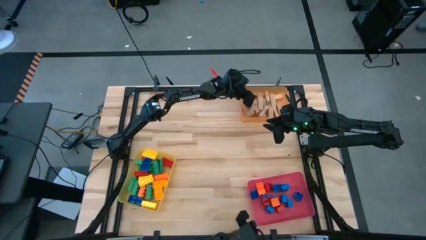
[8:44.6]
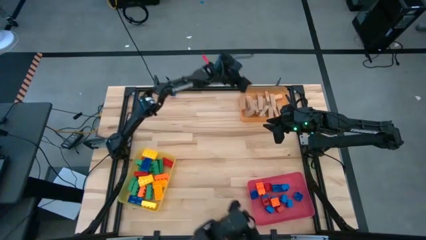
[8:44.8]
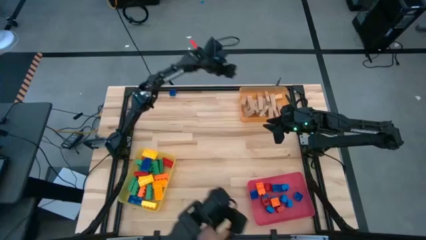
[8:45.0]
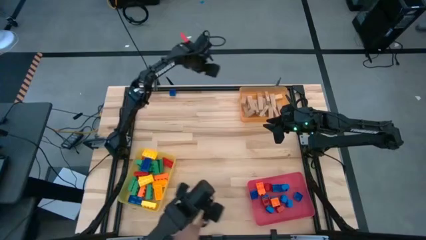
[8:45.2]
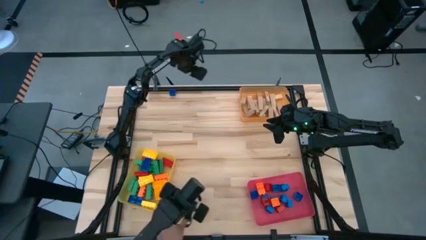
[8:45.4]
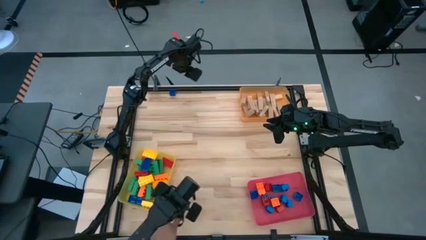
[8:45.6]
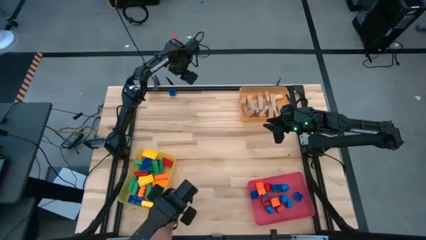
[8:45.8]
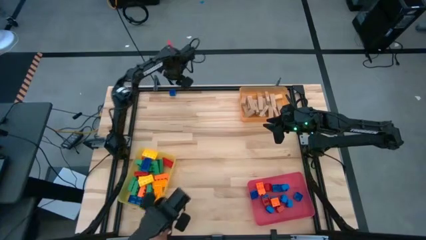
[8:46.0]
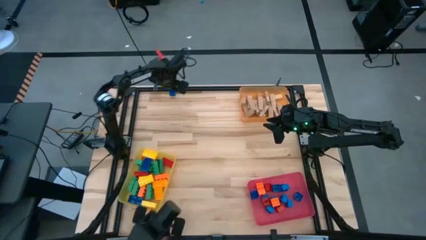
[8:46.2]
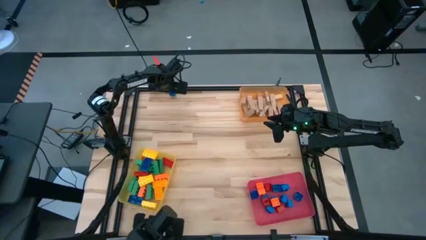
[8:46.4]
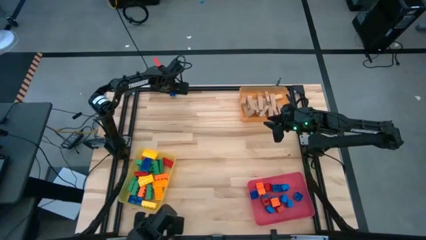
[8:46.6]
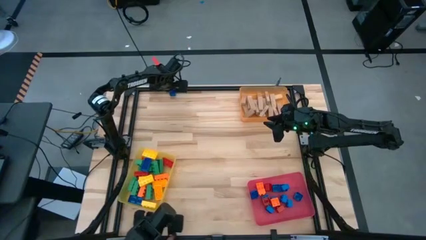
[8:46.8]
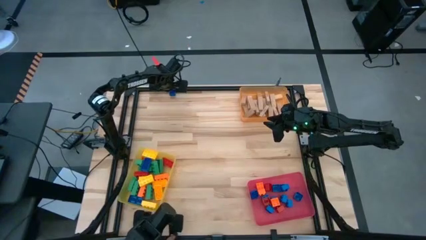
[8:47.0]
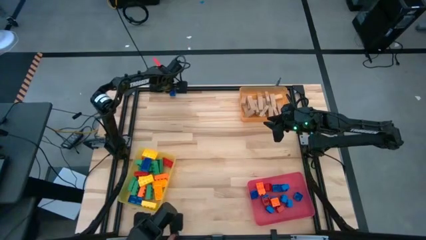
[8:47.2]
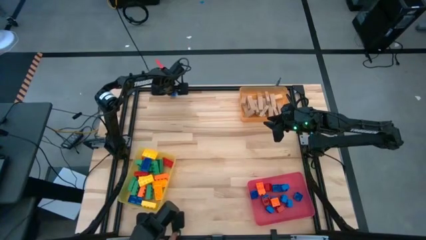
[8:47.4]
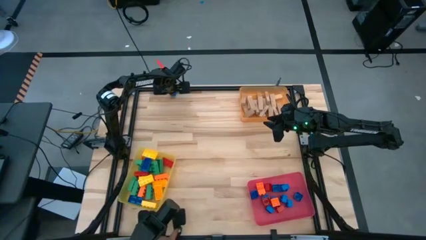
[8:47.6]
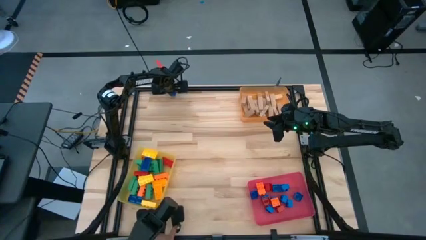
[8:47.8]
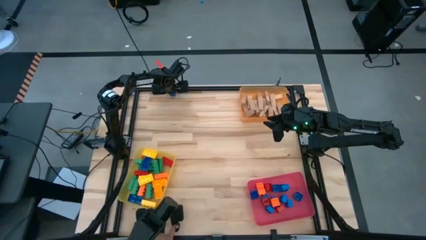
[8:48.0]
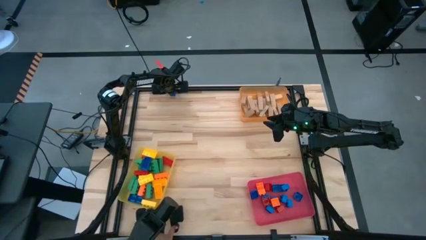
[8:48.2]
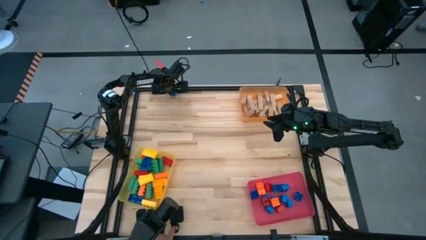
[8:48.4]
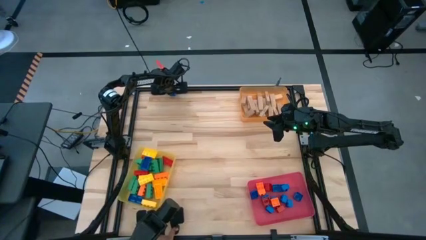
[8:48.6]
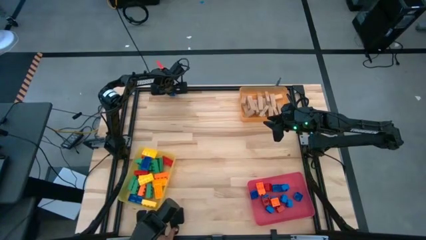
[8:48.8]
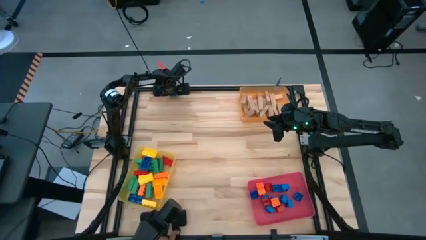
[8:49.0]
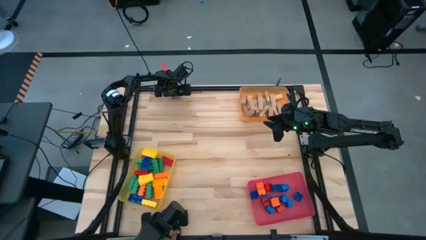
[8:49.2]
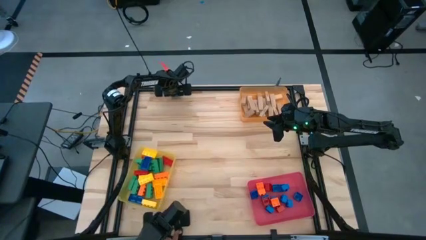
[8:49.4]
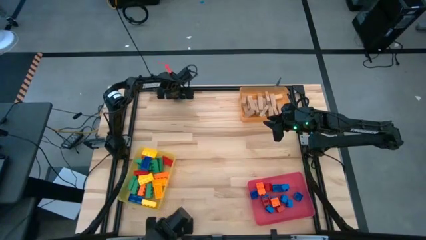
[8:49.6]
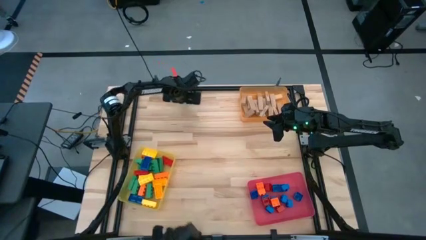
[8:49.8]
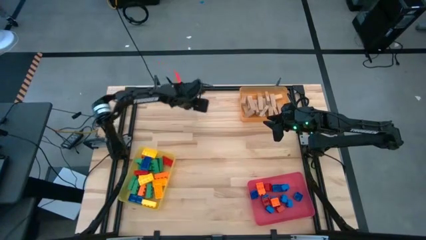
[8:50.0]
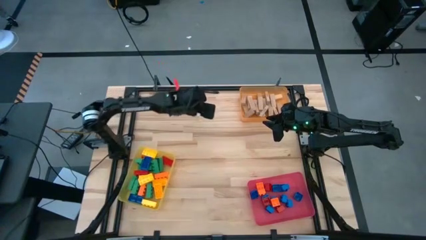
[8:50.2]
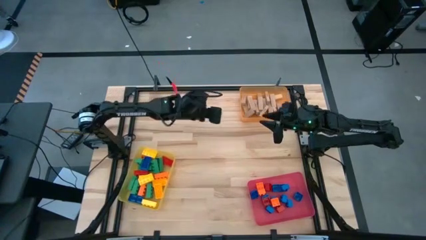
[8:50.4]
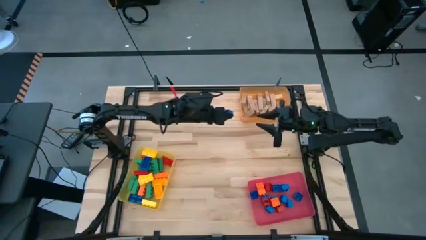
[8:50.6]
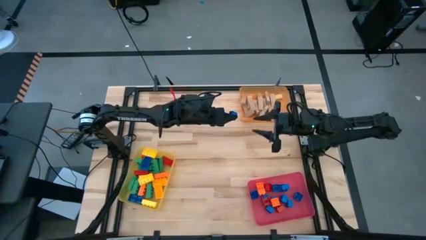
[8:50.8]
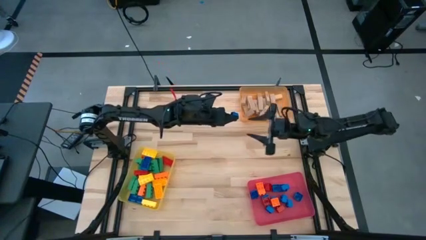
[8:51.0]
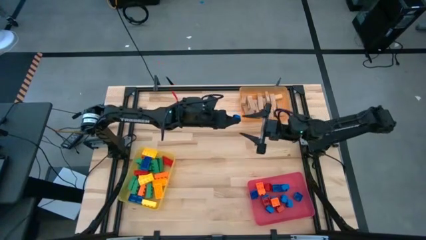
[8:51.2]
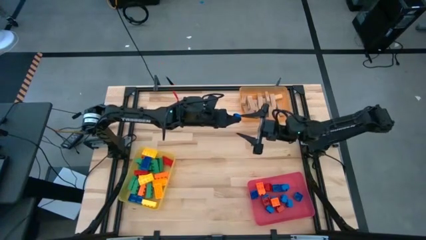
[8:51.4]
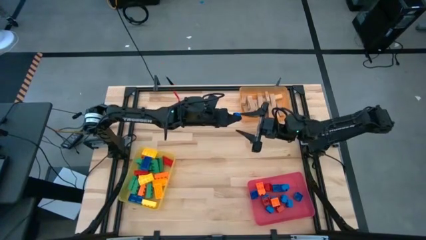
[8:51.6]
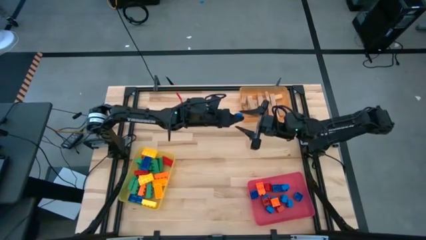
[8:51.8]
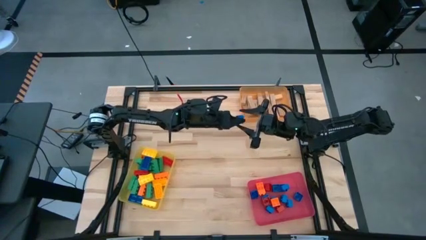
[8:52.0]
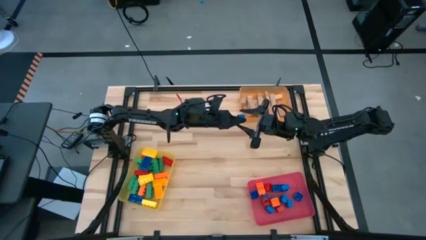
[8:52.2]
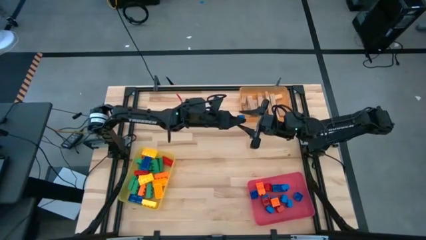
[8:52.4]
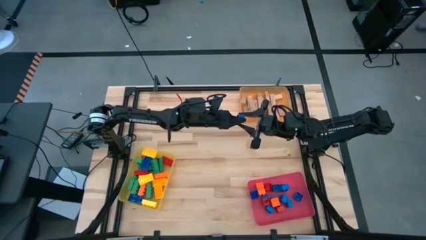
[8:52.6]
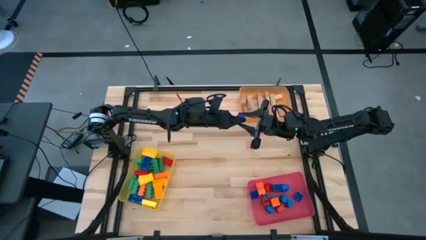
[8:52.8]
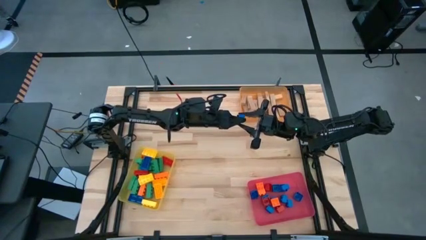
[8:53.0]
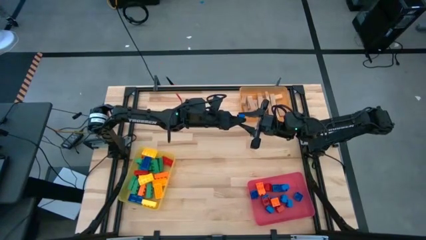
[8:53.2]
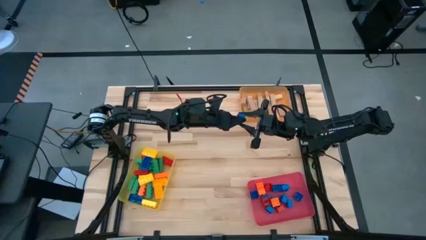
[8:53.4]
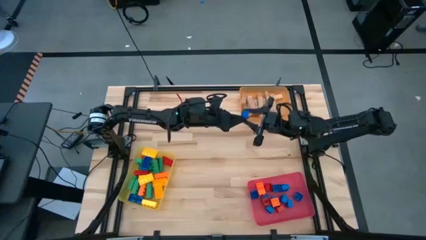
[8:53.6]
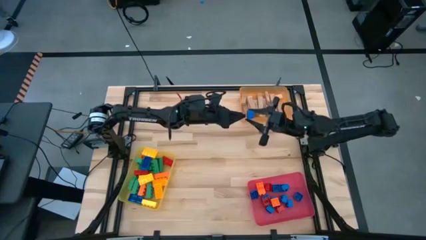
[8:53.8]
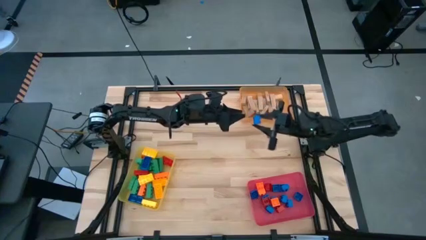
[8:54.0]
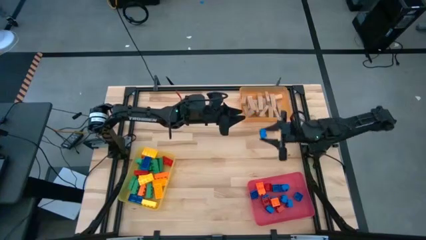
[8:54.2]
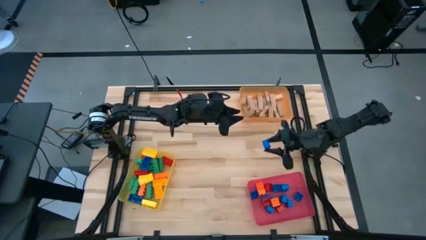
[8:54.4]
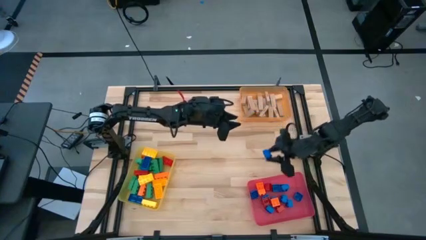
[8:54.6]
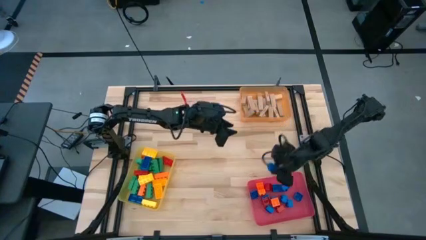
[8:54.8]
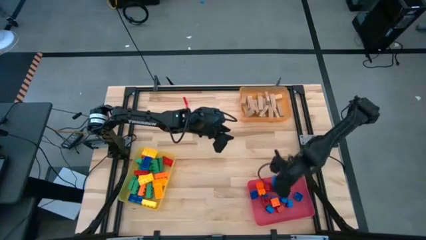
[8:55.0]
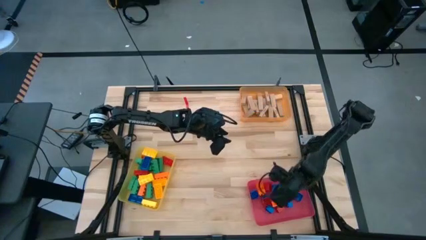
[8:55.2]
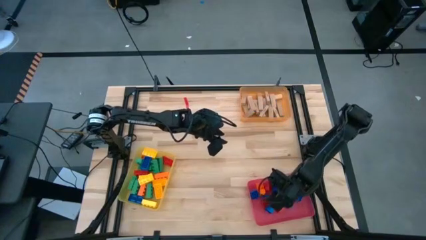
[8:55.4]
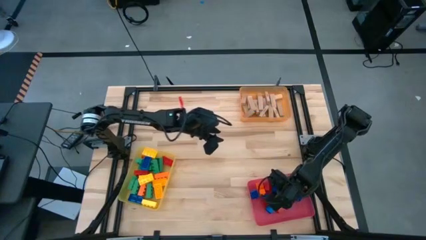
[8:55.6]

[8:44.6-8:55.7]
Task: Sort blocks by size
Put the small blue game piece into the red bin

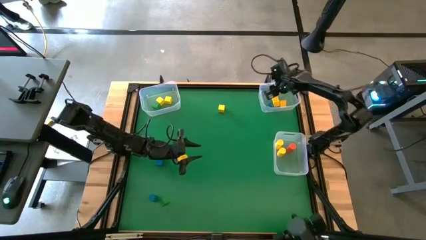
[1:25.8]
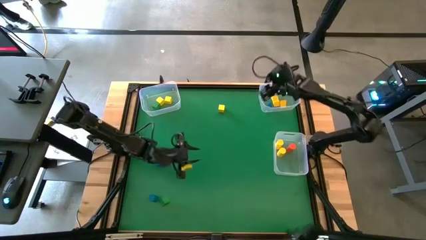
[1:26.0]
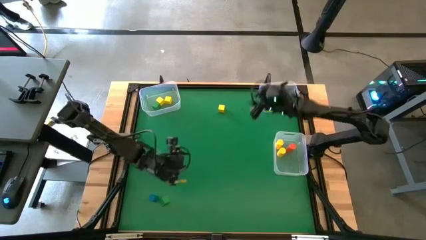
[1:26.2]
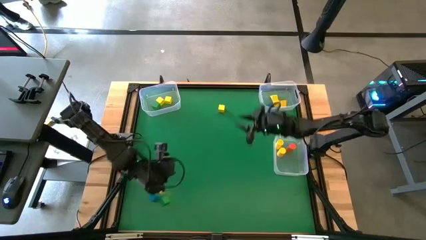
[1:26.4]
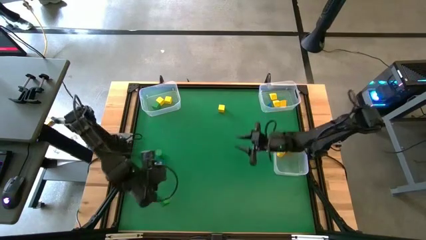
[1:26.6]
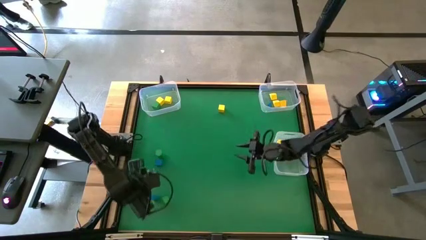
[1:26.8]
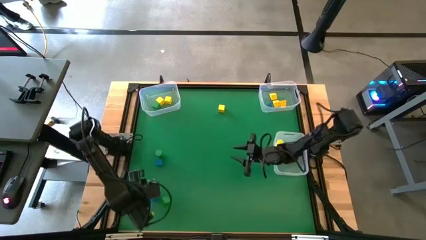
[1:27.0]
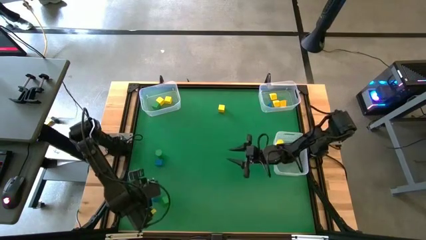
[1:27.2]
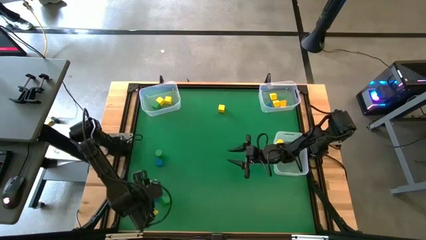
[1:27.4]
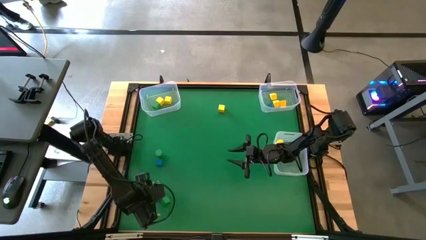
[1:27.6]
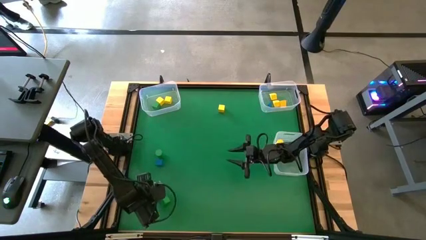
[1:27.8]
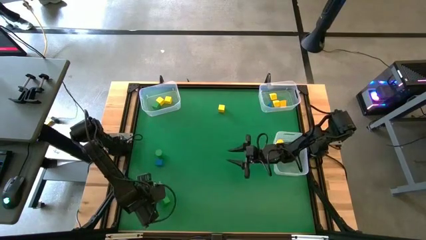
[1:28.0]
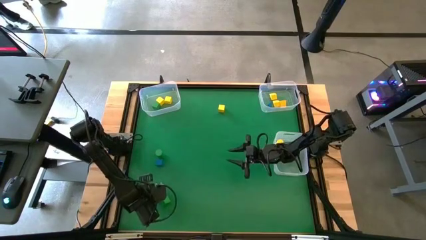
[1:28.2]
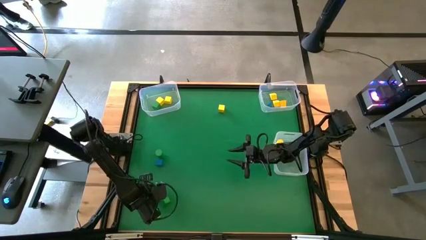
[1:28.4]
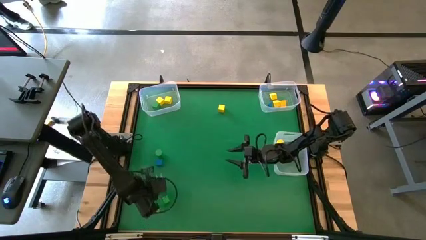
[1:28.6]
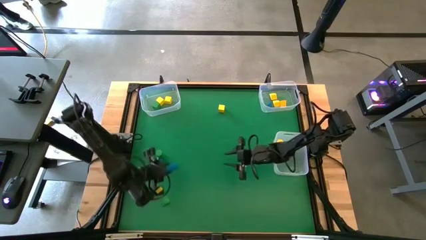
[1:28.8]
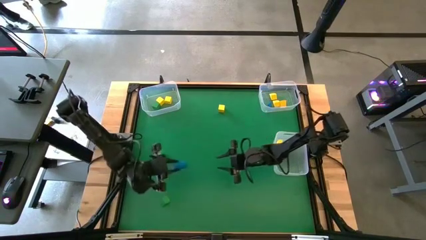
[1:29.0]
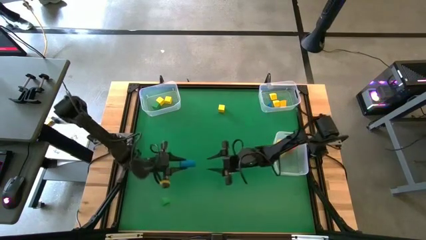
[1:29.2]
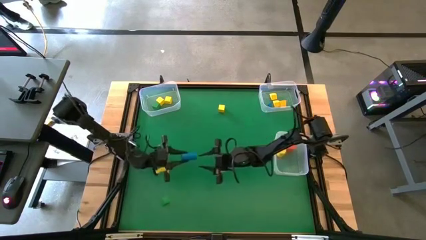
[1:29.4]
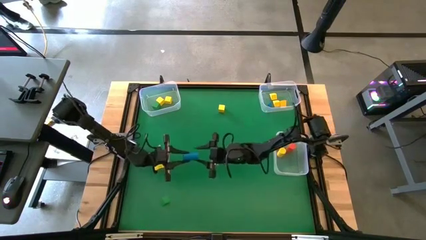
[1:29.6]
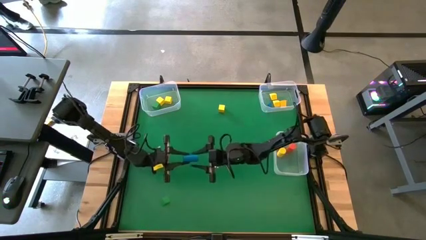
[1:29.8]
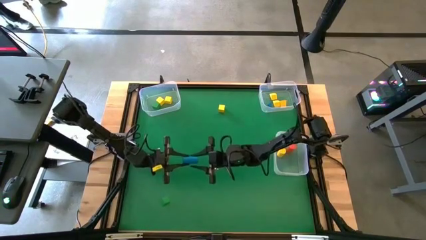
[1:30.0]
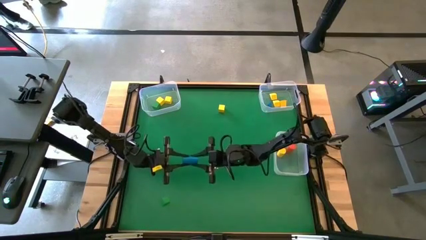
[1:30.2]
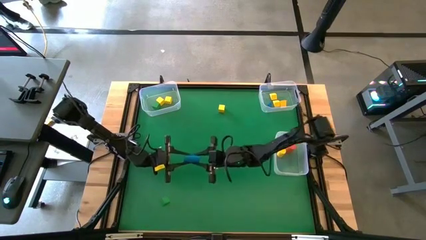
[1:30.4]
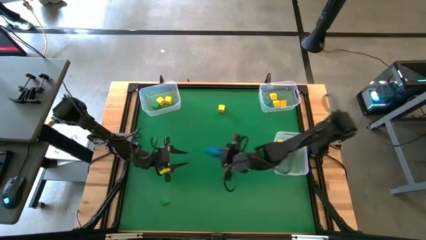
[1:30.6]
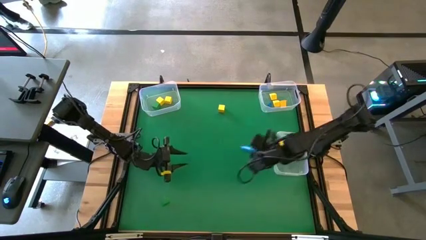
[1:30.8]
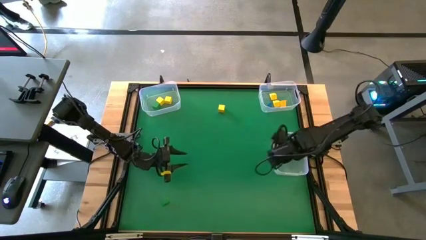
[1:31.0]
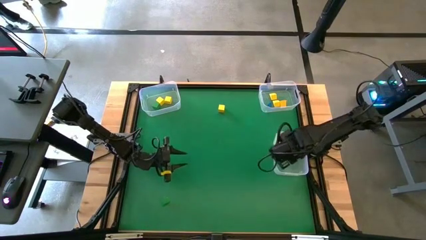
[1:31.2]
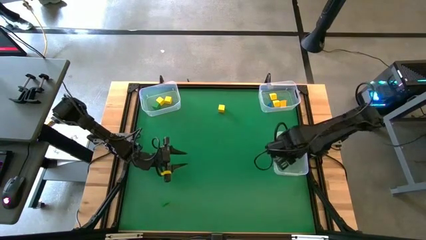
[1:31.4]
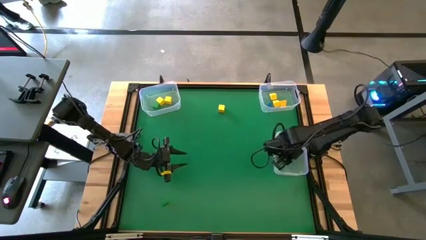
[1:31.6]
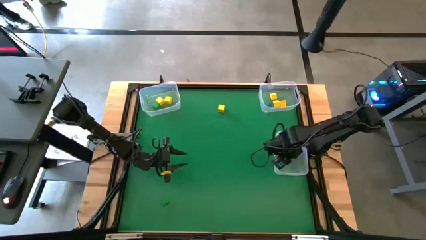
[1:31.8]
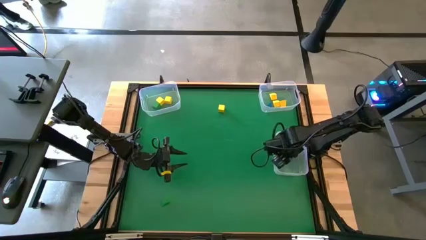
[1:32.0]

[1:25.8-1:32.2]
Task: Sort blocks by size
Put the blue cylindrical block into the bottom transparent bin
